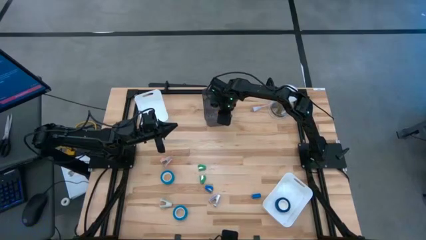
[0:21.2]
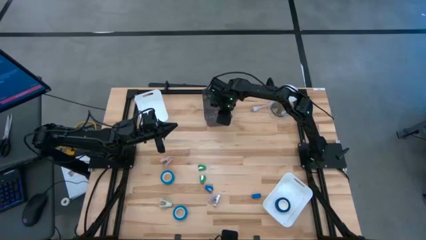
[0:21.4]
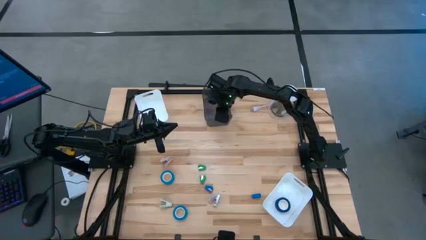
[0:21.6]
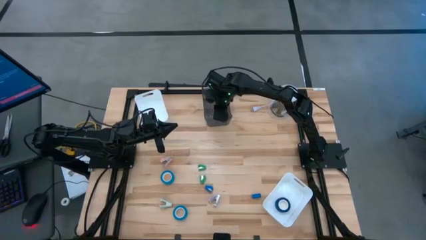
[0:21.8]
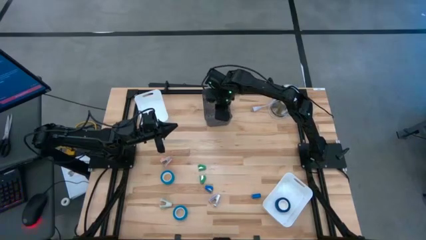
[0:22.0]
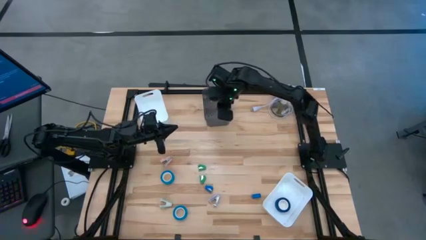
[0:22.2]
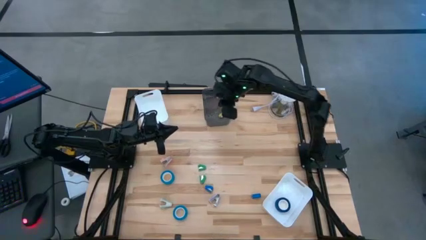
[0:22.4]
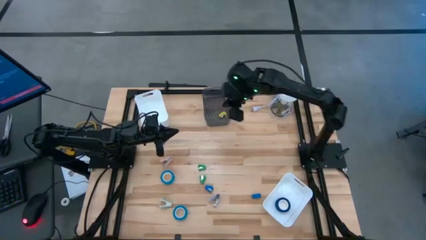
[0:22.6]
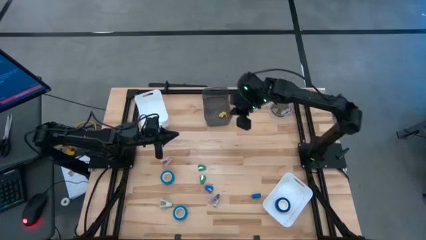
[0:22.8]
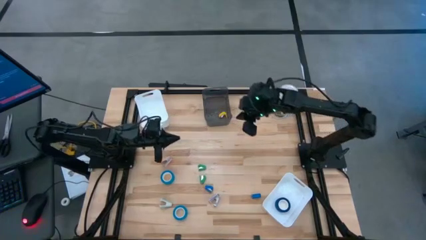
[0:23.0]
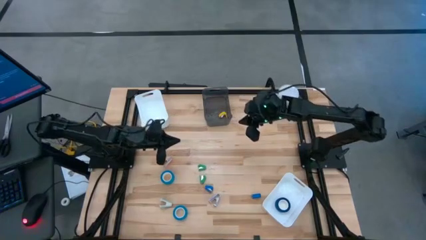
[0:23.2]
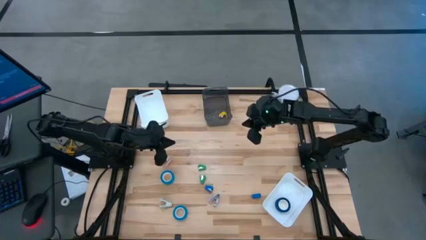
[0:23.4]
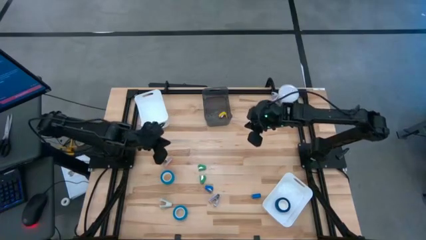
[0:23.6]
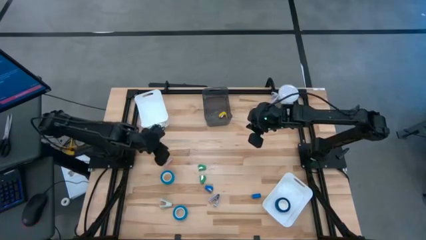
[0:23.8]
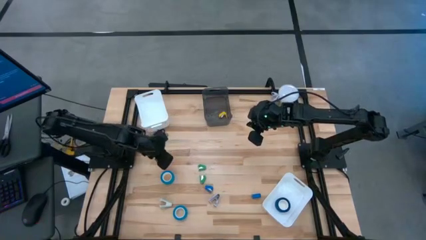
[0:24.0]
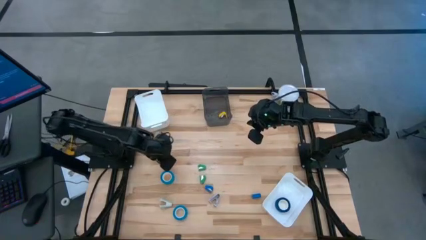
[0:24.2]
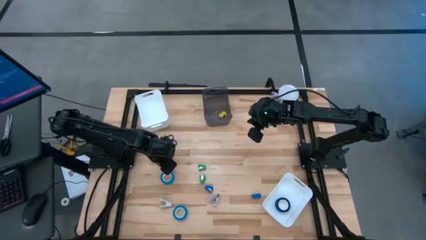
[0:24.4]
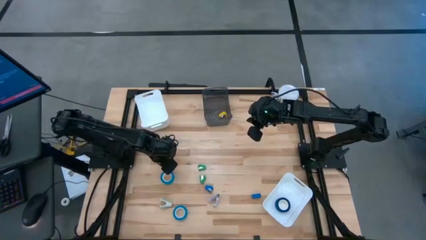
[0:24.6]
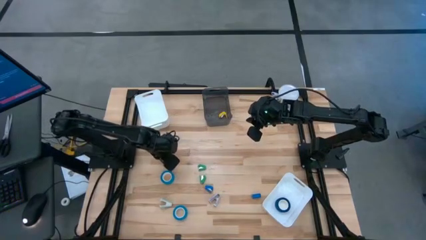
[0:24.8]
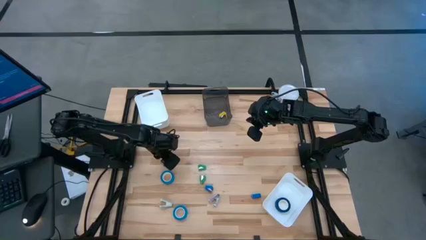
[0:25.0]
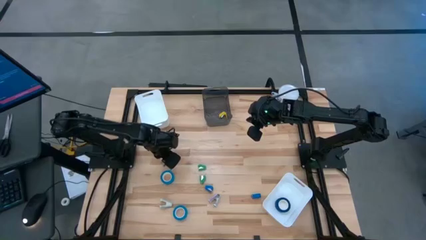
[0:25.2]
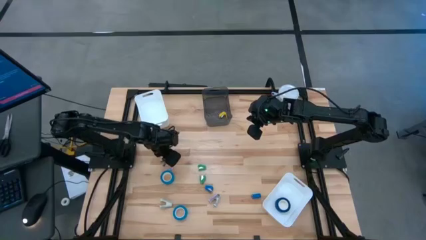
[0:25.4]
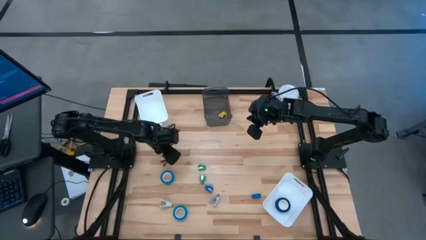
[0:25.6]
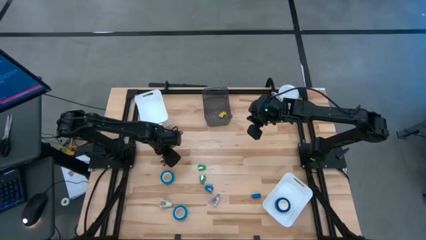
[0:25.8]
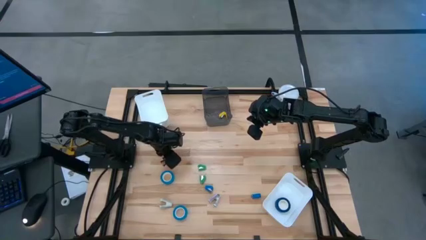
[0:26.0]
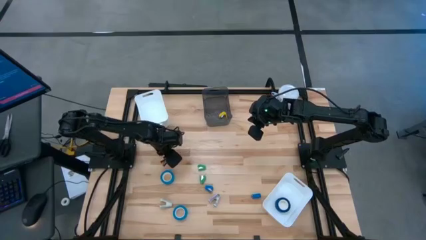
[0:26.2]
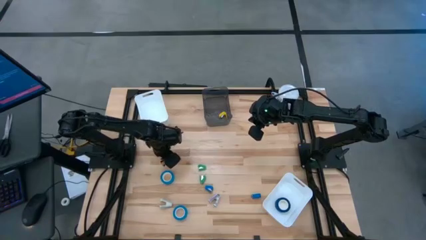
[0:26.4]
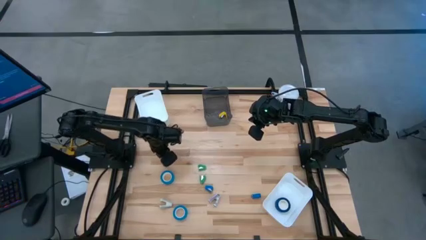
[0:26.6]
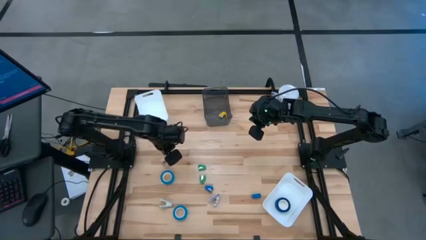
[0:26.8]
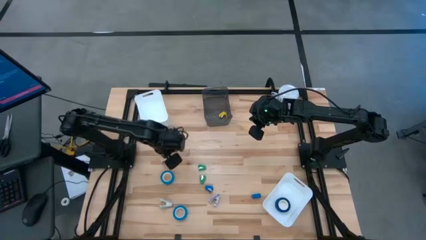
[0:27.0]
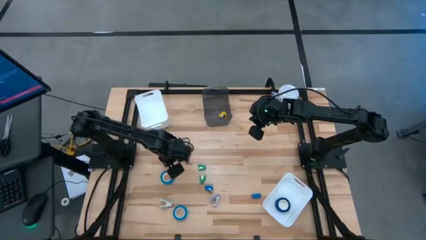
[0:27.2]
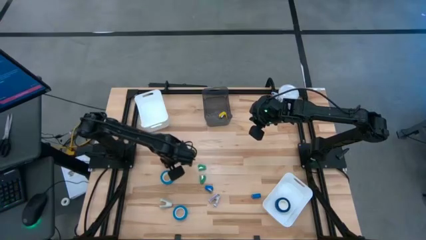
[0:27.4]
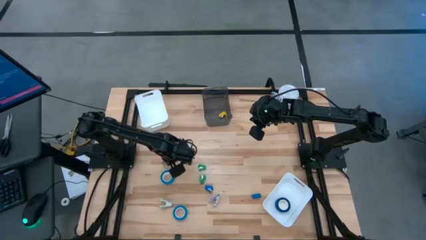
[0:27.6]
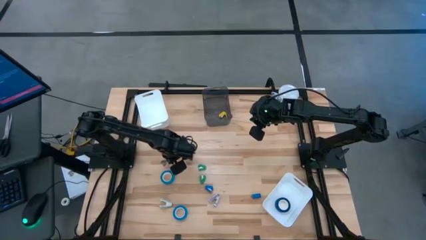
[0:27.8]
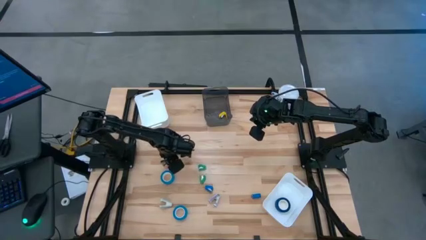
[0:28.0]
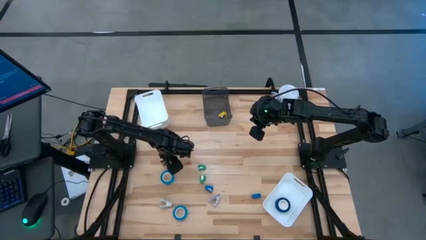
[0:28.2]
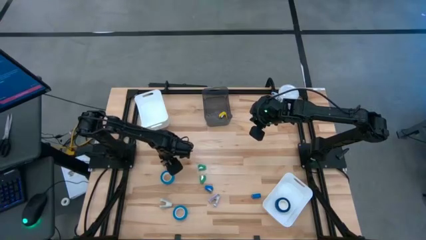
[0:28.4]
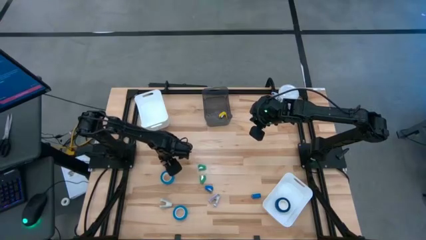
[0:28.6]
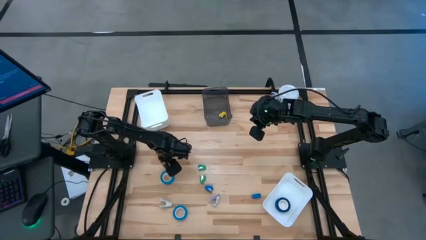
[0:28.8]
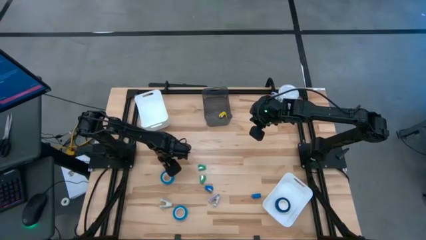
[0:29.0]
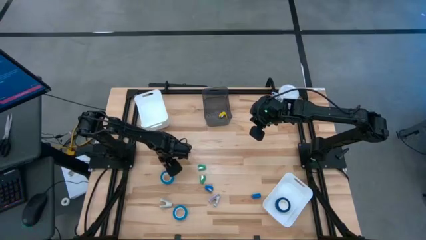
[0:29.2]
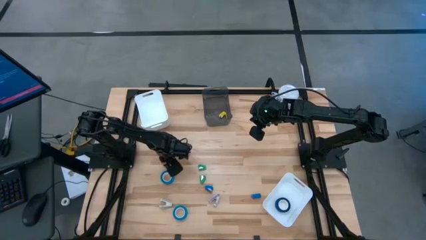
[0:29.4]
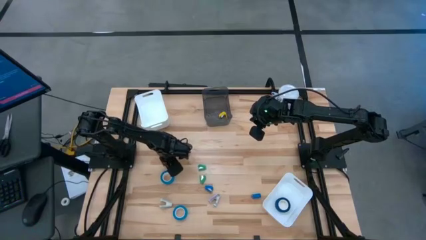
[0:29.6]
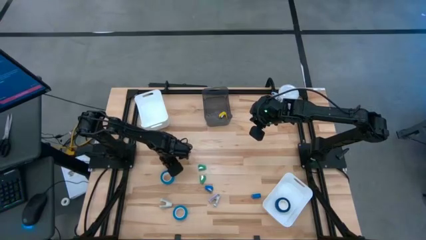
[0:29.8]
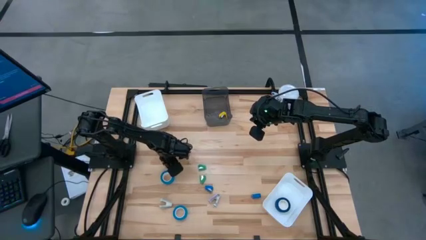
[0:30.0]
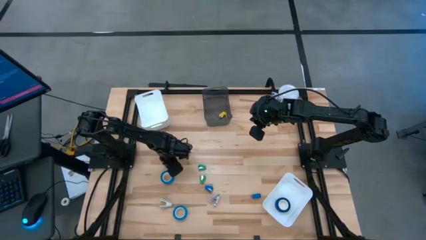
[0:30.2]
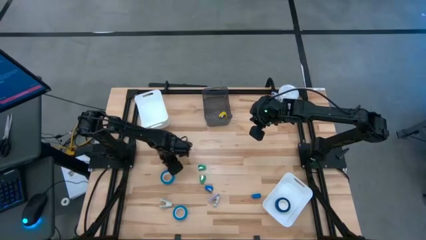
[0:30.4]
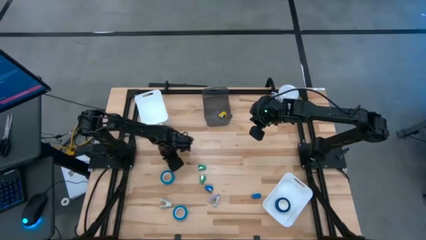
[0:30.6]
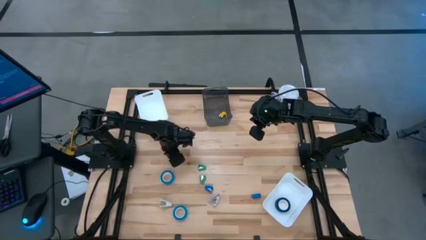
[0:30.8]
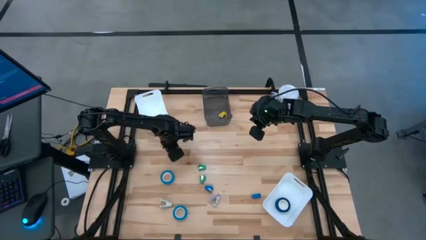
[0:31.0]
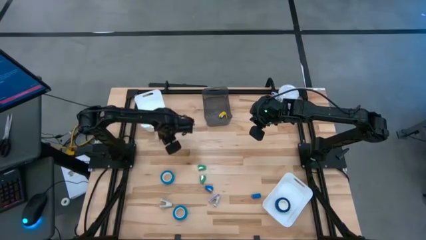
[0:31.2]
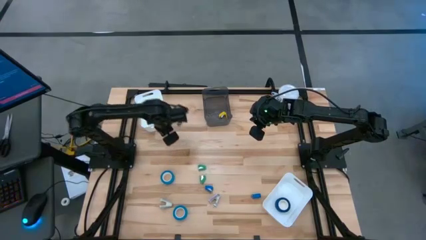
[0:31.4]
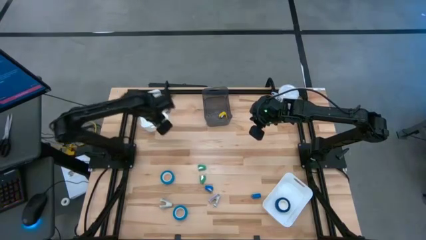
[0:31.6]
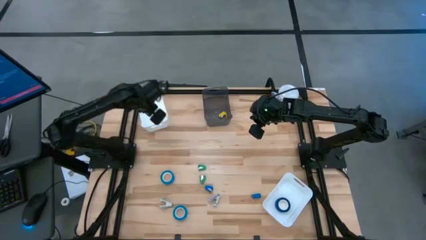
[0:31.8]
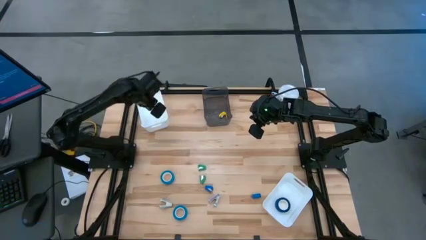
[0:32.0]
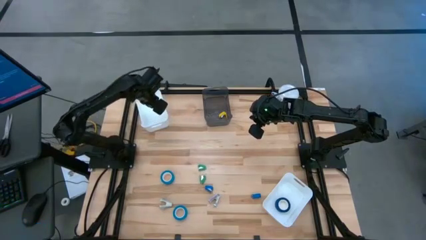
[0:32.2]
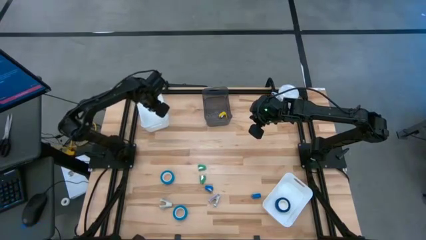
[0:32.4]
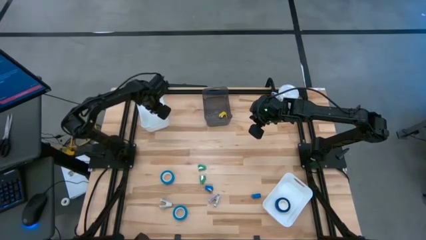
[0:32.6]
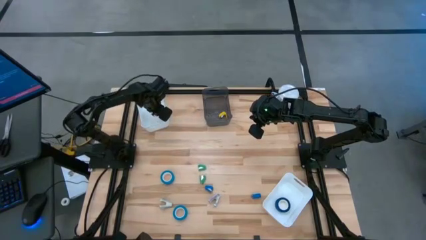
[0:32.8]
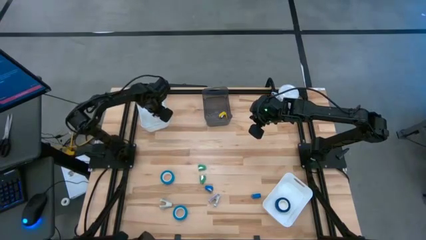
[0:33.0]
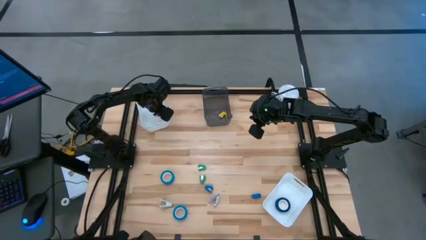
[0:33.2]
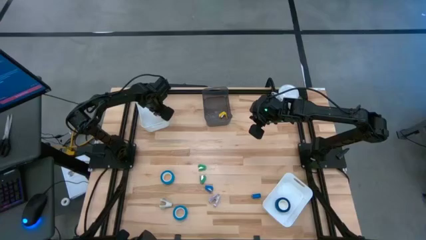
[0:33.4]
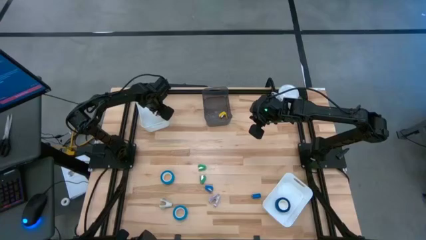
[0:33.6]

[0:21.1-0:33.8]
Task: Pick and place Stapler, Stapler remover, tape
Put the top pink staple remover into the top white bin

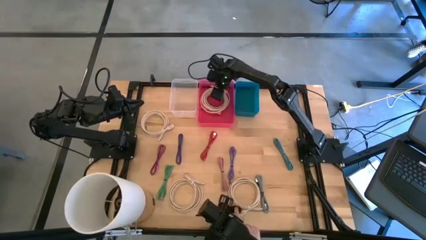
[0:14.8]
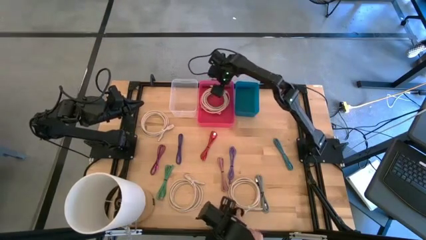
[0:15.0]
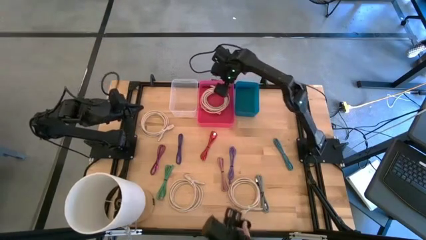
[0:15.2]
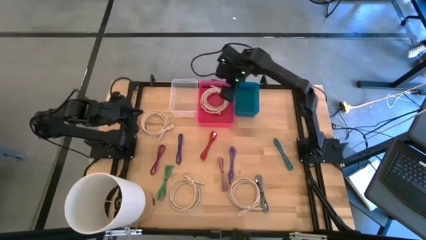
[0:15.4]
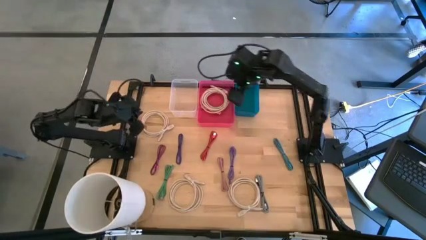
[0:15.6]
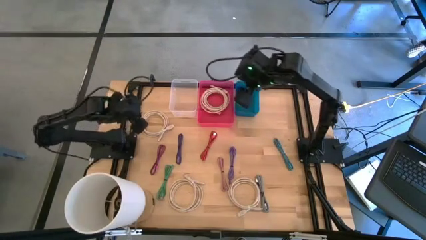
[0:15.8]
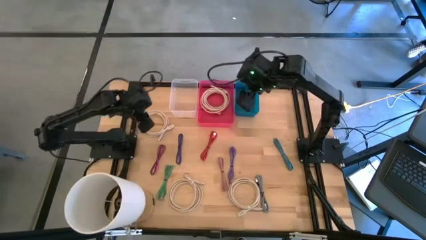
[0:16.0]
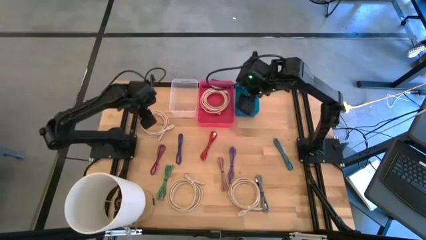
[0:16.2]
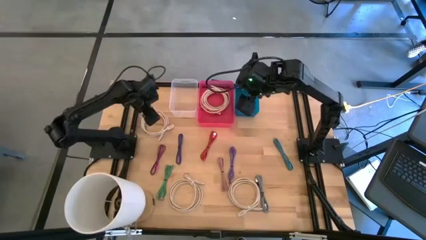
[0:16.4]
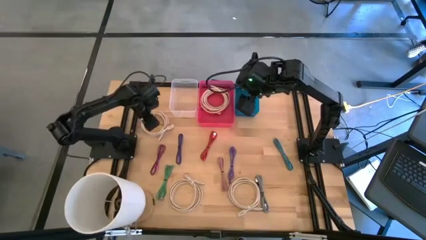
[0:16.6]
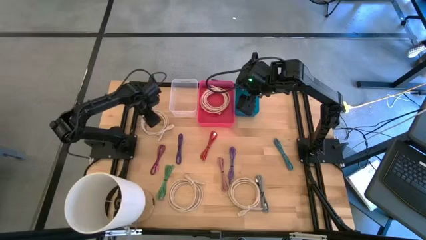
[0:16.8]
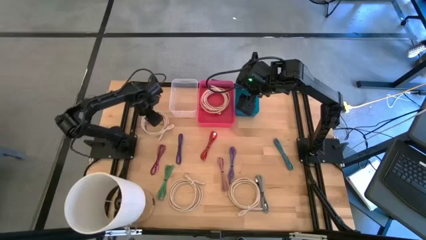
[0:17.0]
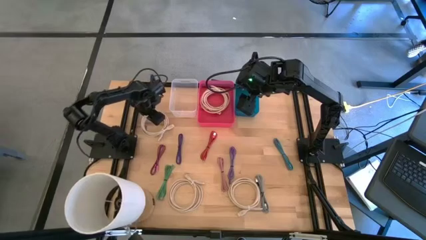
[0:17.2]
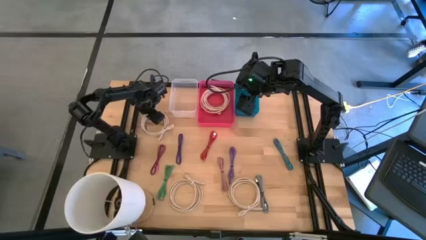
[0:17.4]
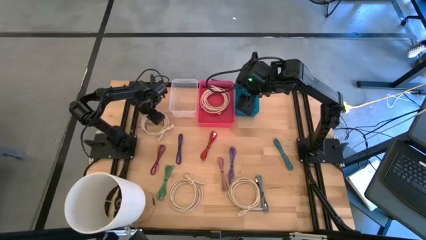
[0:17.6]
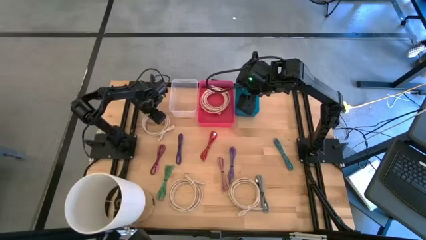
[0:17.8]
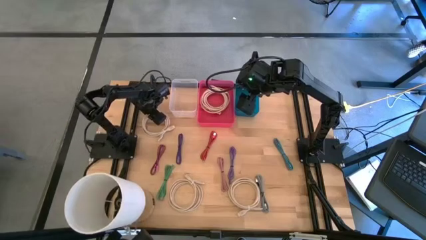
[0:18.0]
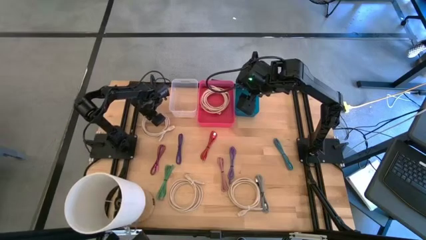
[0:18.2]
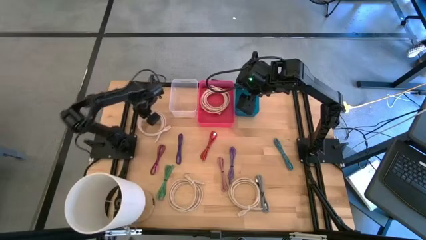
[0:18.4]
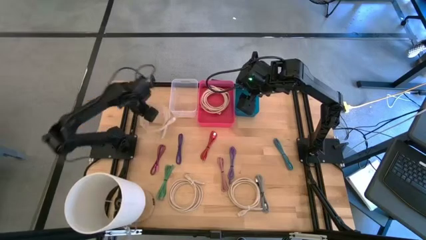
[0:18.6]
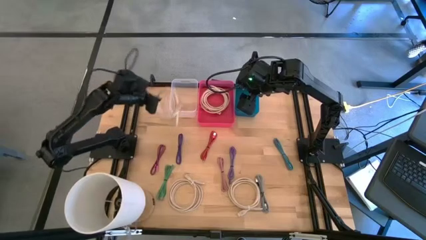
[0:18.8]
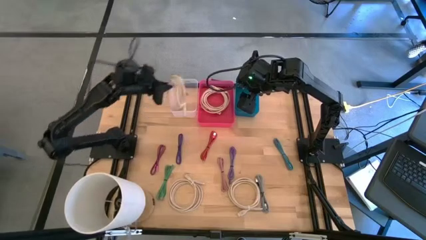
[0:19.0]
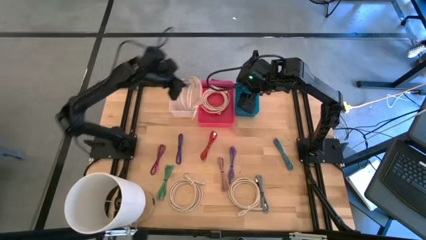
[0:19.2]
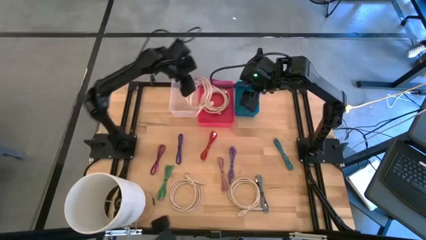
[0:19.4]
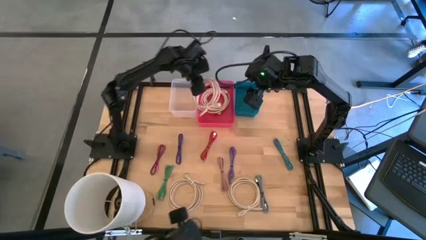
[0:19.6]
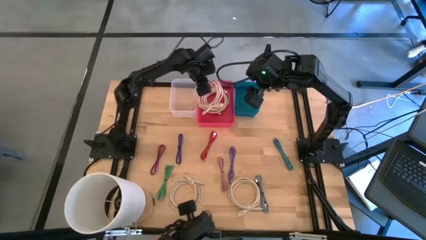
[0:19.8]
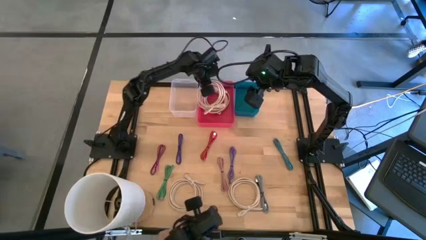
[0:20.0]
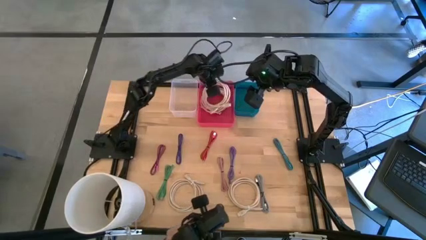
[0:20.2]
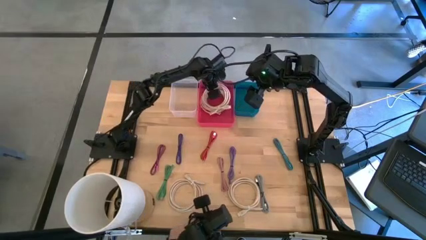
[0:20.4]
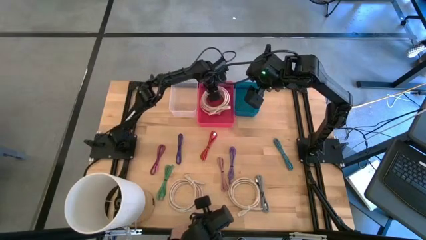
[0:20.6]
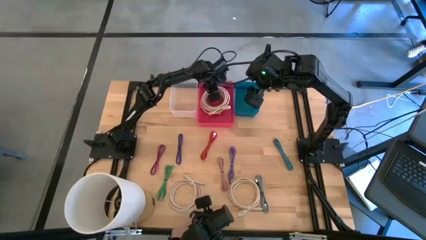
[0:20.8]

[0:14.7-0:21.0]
Task: Pick & Place USB Port
Put the white HDMI cable into the pink bin
